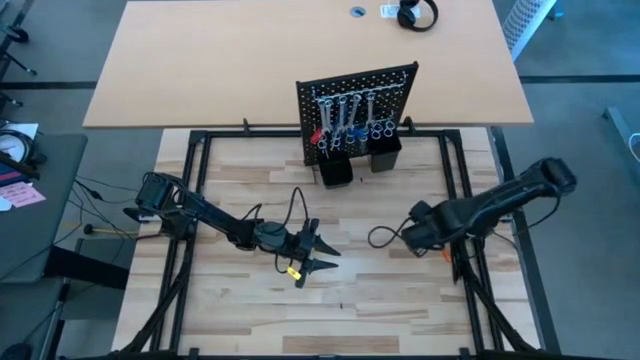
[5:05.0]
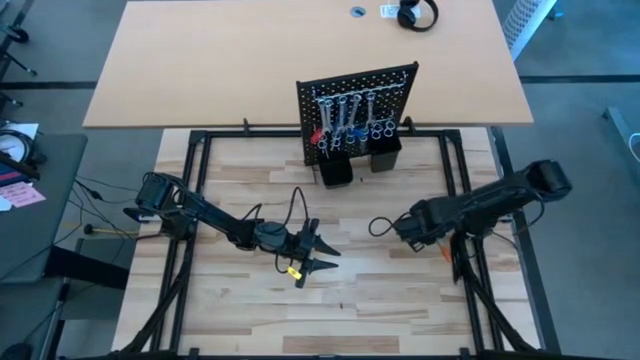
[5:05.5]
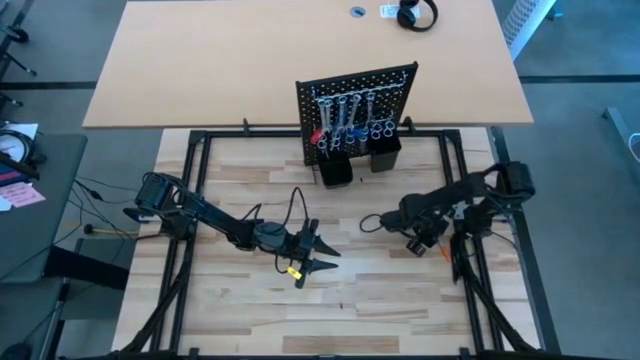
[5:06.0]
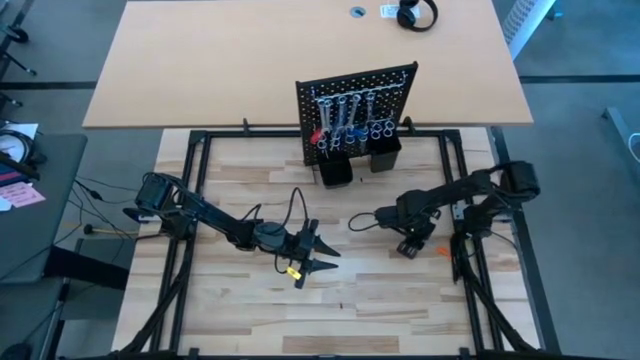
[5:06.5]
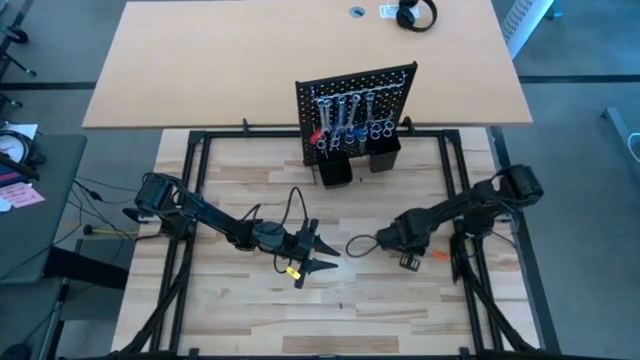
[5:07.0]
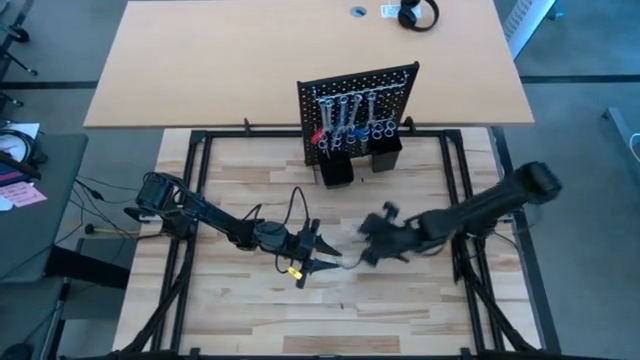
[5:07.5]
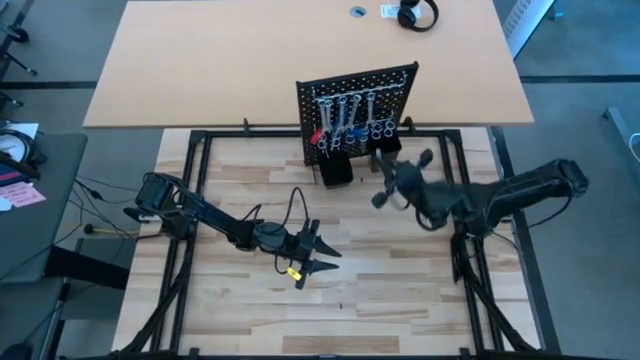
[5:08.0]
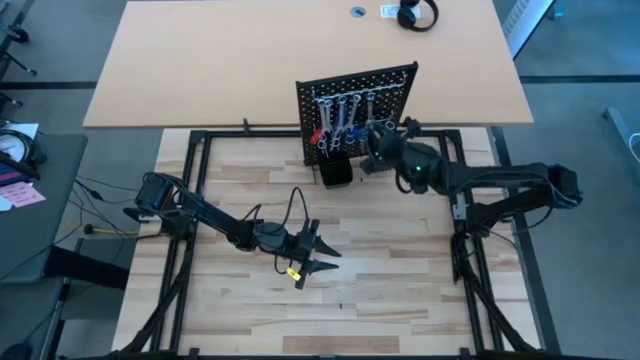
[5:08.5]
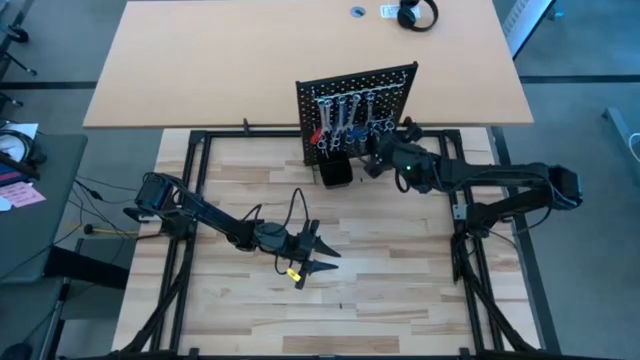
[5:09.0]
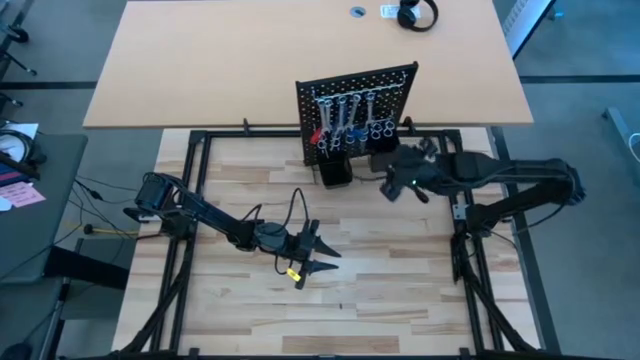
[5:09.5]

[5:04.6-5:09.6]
Task: Hang tools onto peg board
Put the orange pen into the right black bin on the pegboard

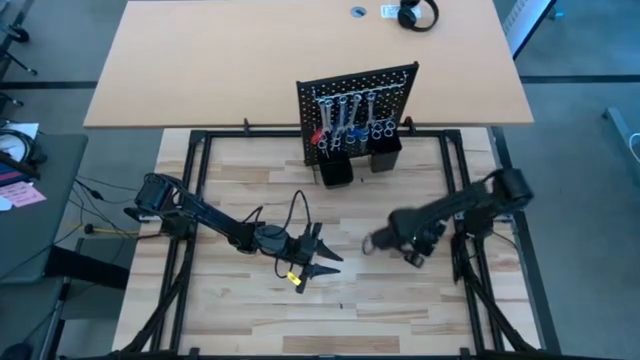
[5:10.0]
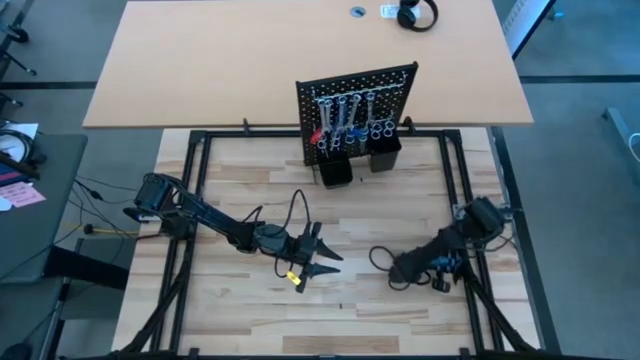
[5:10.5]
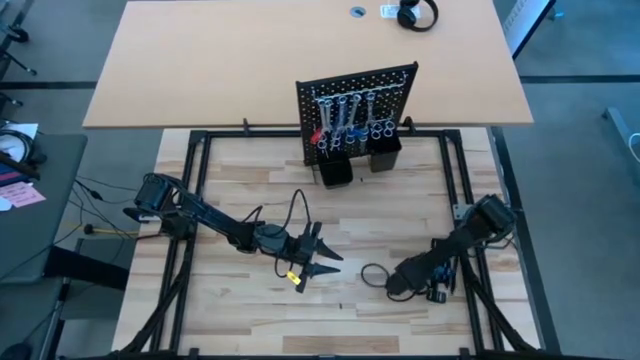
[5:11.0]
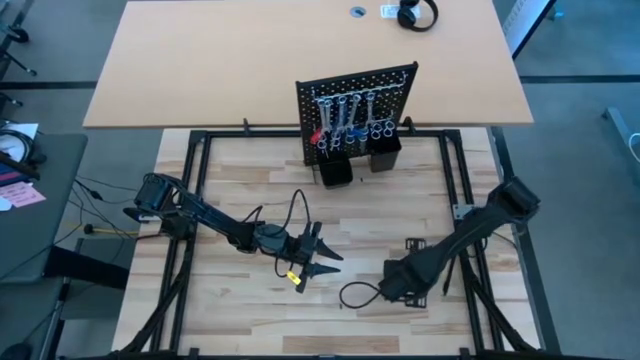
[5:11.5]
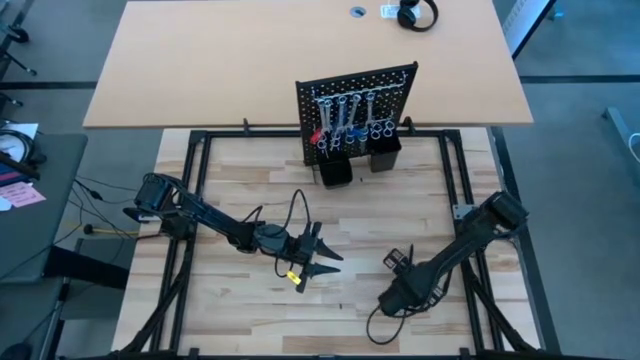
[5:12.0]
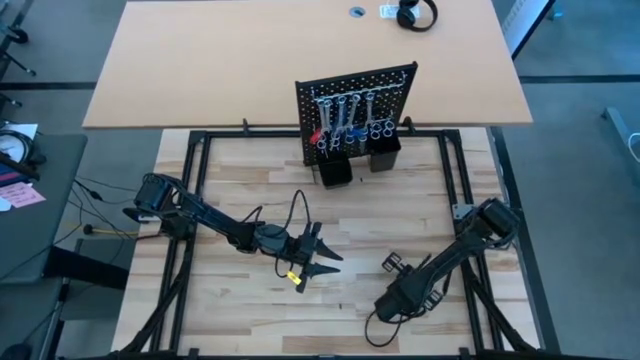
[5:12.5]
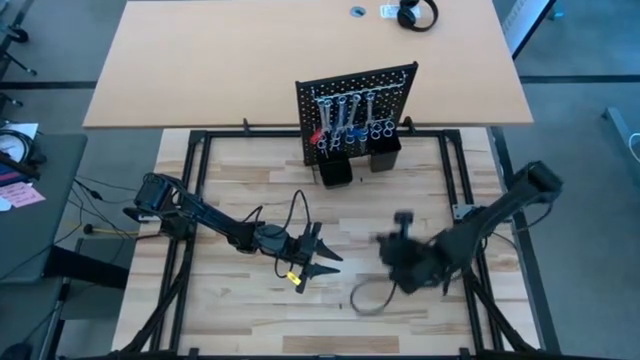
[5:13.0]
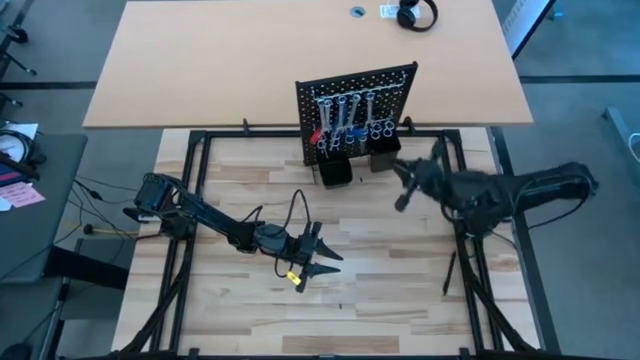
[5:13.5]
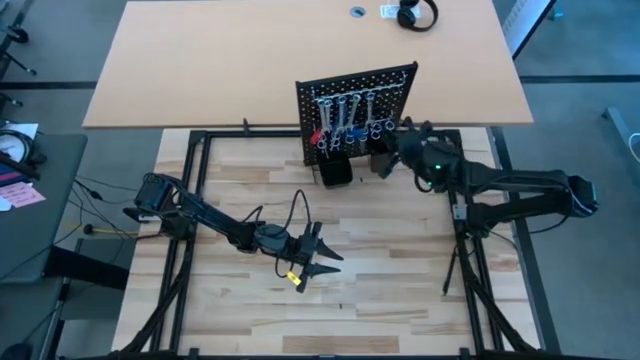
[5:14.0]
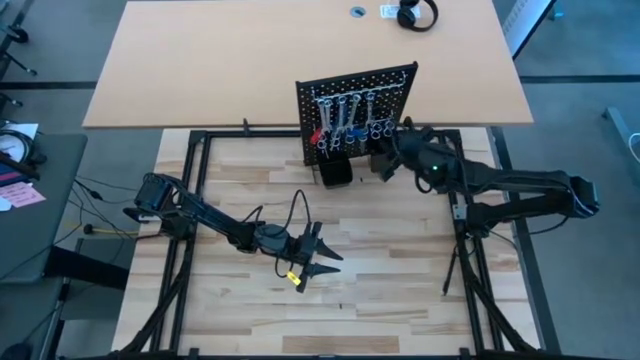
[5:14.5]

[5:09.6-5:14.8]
Put the left black pen into the right black bin on the pegboard

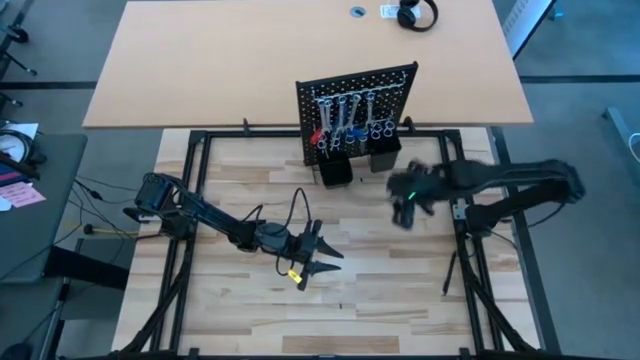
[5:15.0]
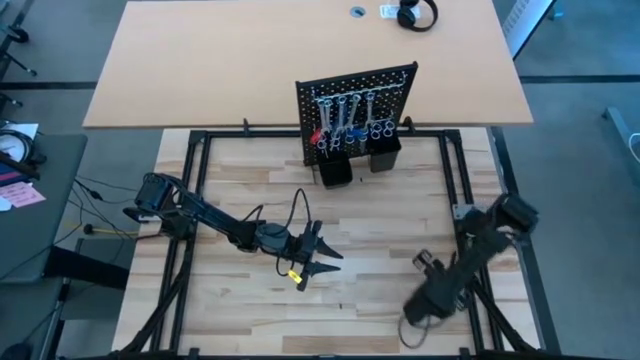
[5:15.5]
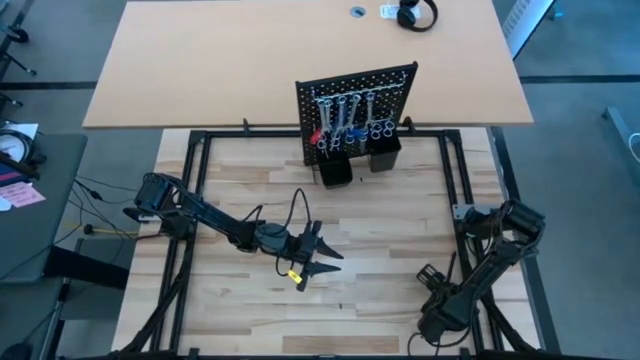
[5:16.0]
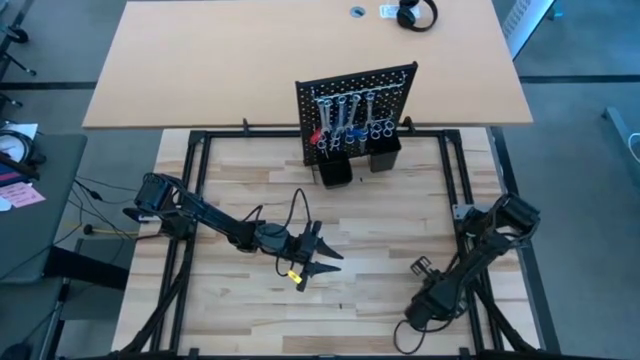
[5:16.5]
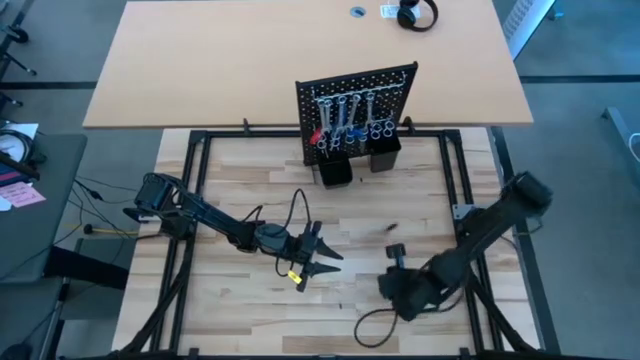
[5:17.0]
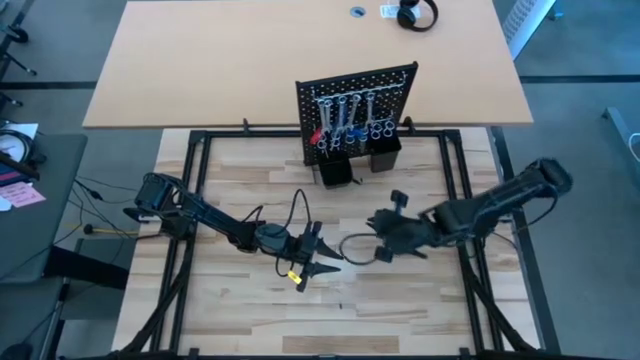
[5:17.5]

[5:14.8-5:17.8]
Put the black pen into the right black bin on the pegboard

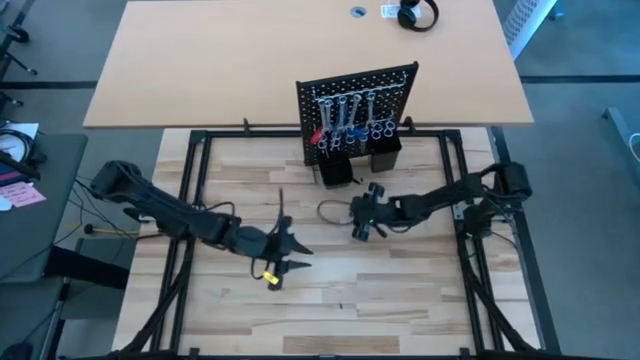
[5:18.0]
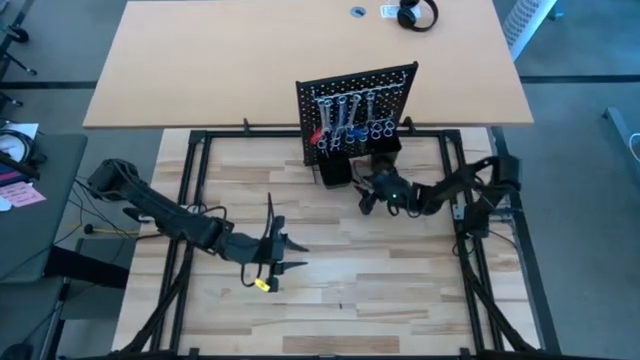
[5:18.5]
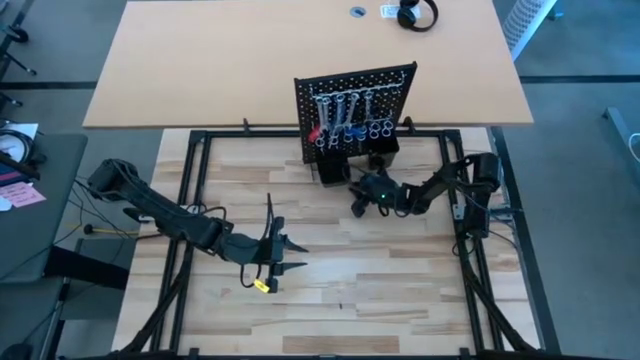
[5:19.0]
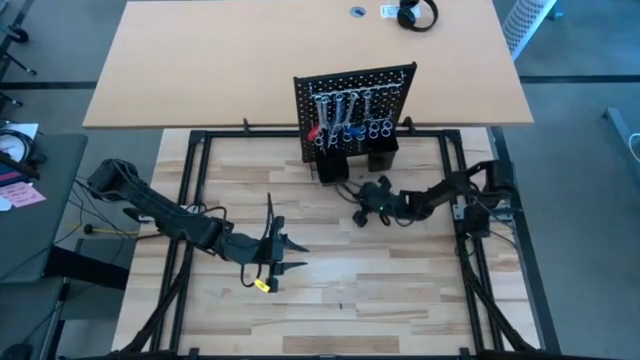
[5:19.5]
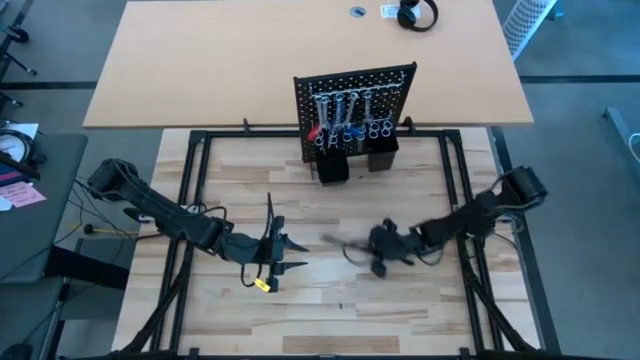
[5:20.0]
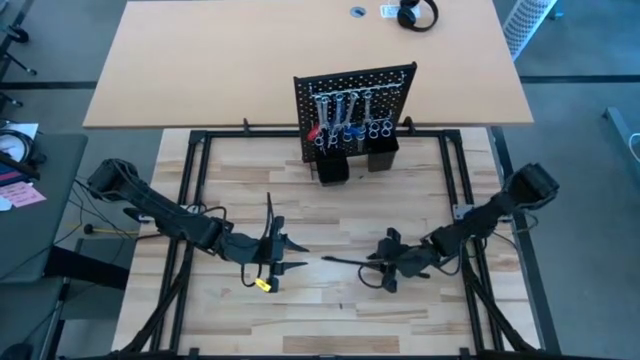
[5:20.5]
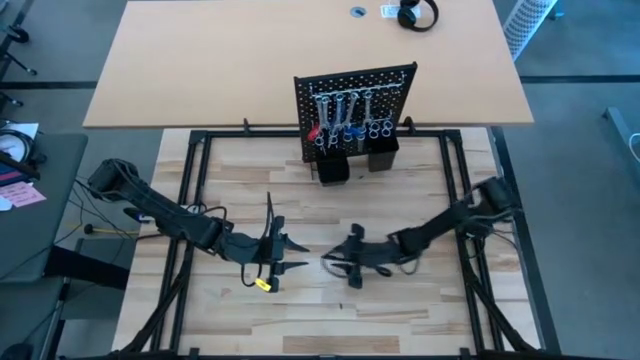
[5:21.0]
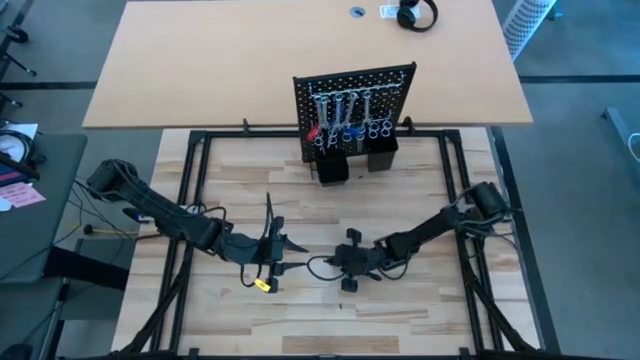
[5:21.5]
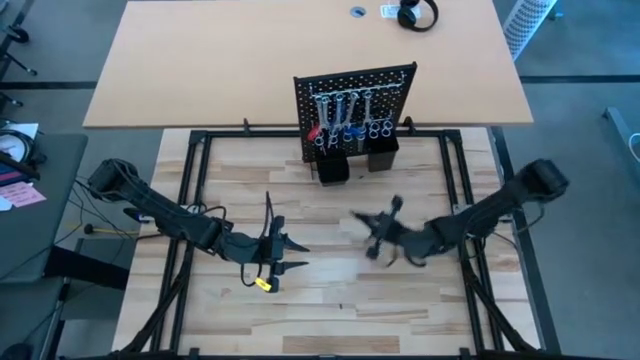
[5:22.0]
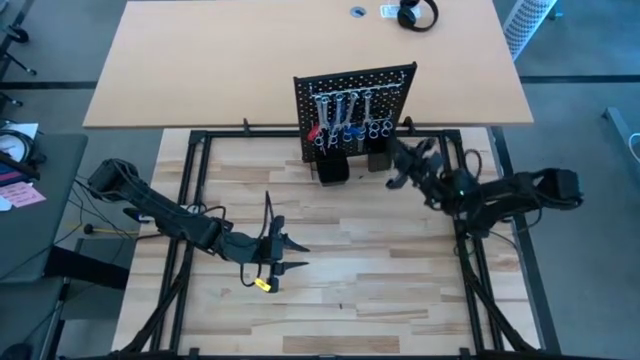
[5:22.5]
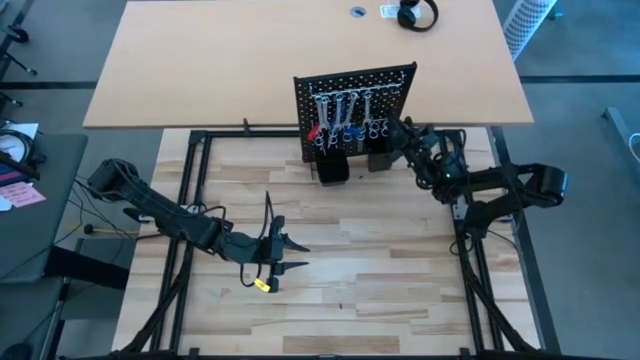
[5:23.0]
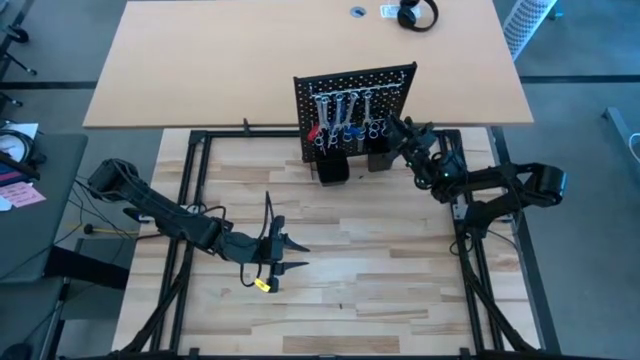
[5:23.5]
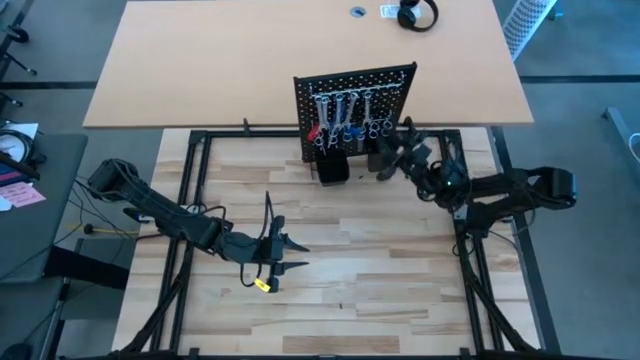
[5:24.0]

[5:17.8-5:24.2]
Put the black pen into the right black bin on the pegboard
